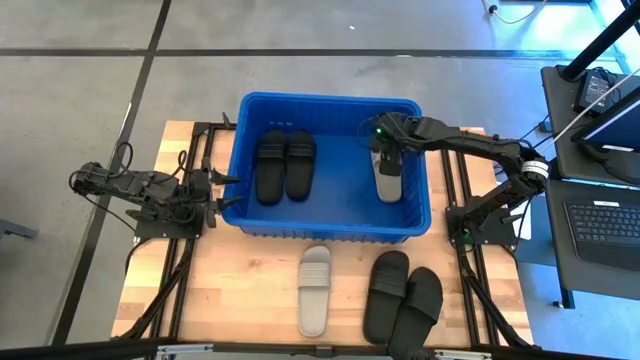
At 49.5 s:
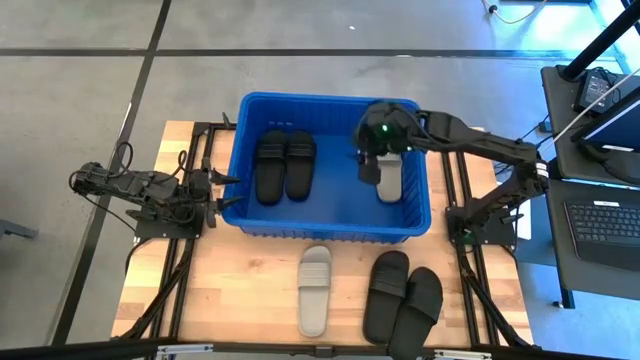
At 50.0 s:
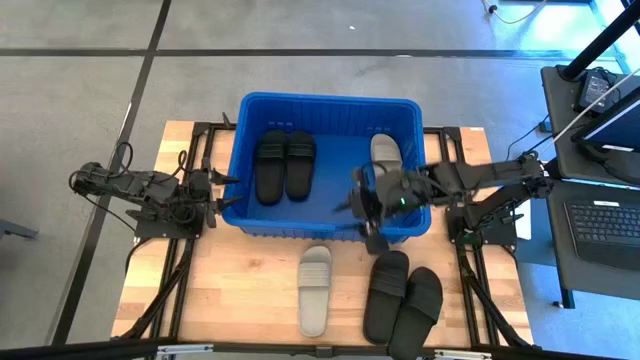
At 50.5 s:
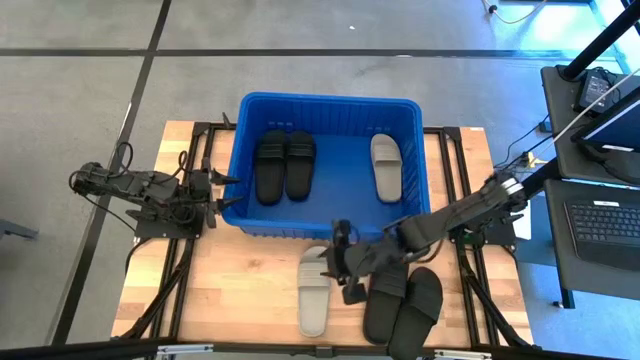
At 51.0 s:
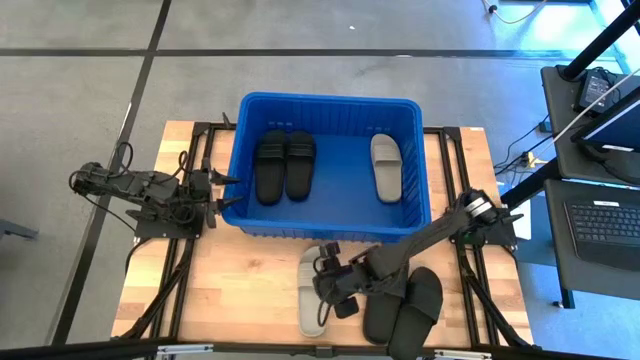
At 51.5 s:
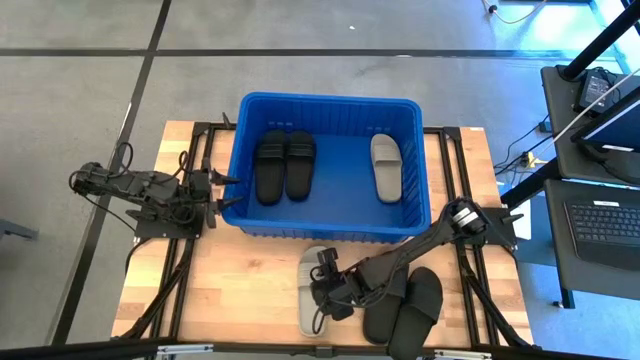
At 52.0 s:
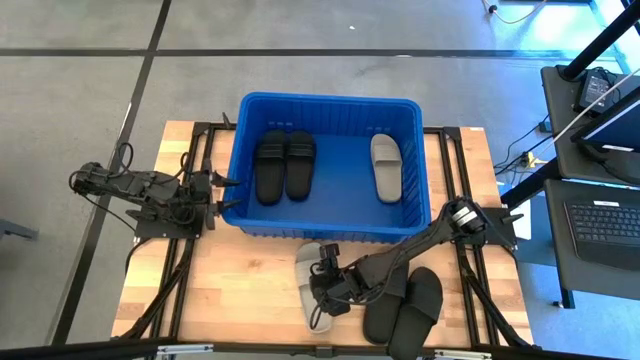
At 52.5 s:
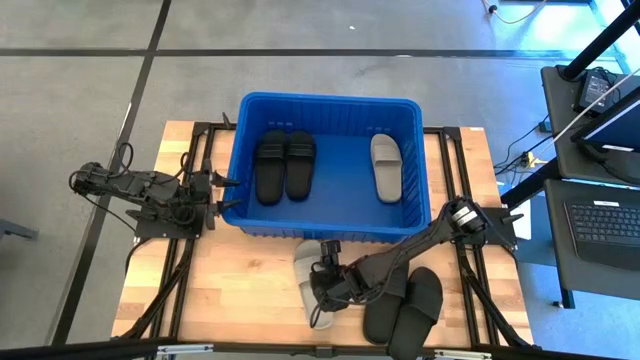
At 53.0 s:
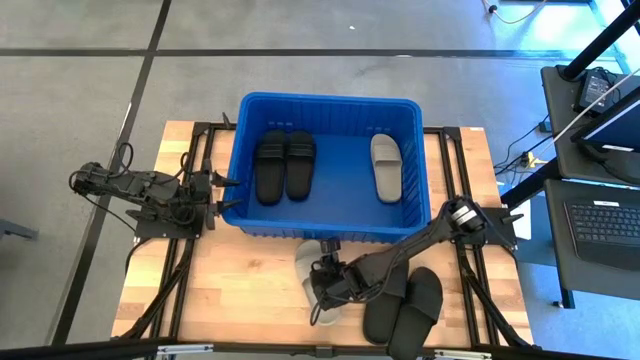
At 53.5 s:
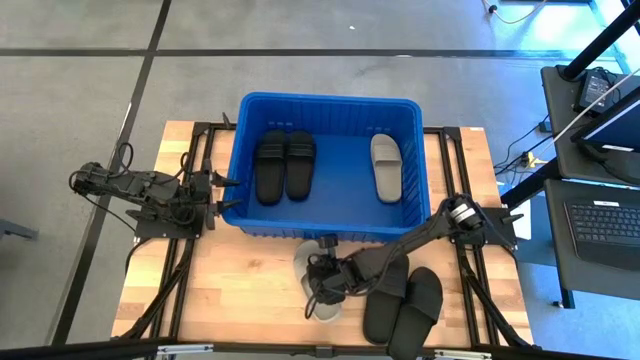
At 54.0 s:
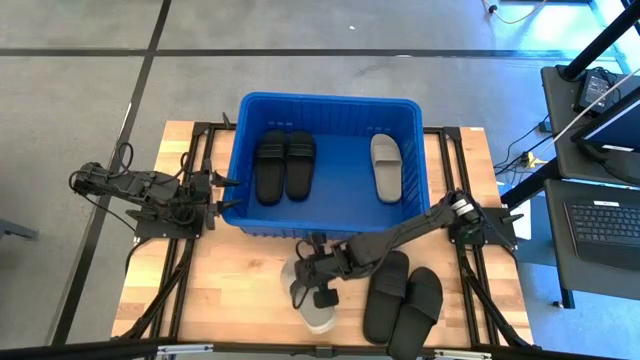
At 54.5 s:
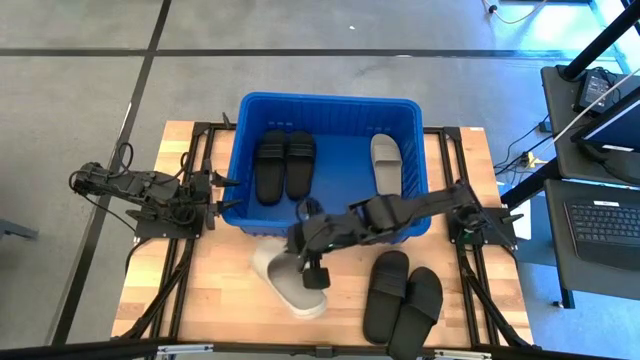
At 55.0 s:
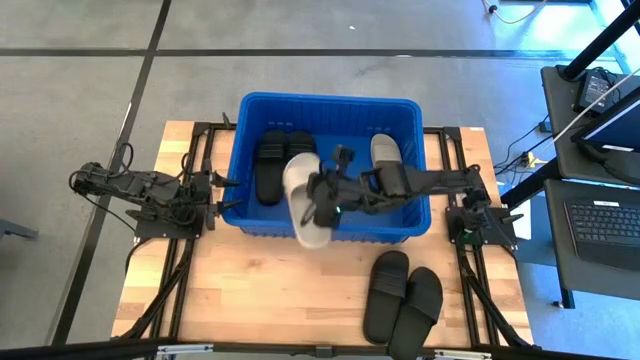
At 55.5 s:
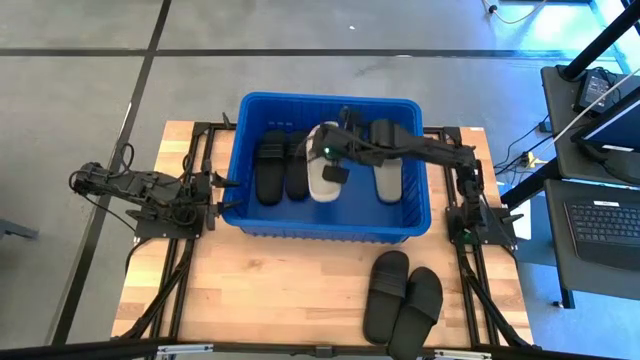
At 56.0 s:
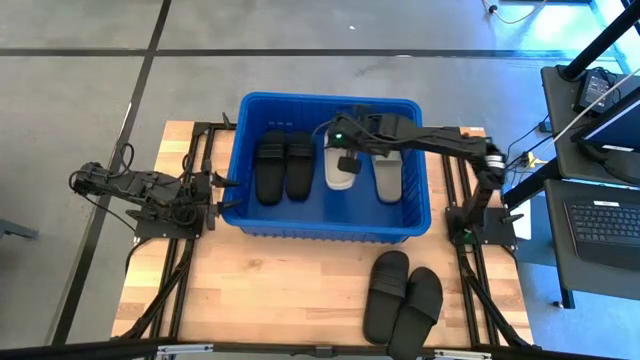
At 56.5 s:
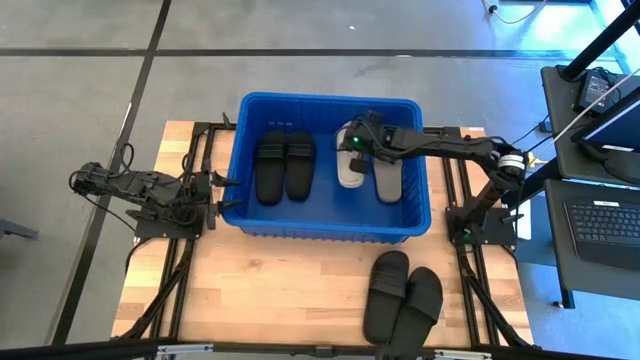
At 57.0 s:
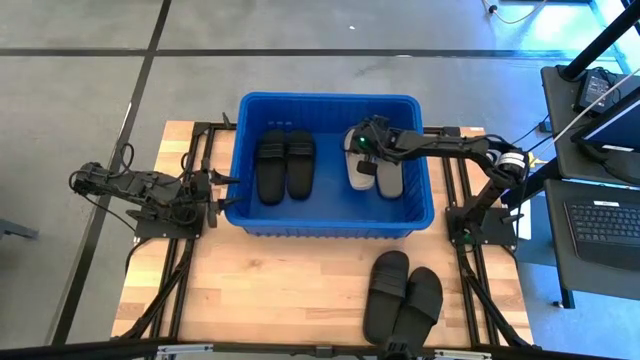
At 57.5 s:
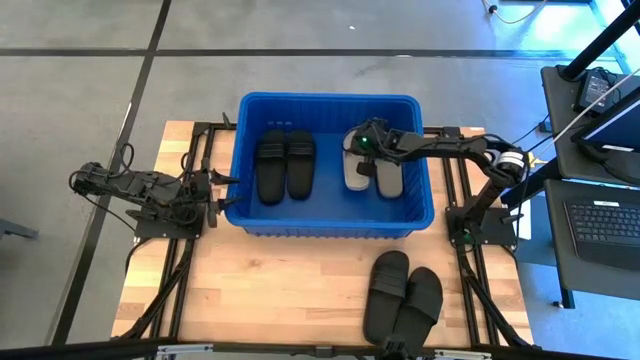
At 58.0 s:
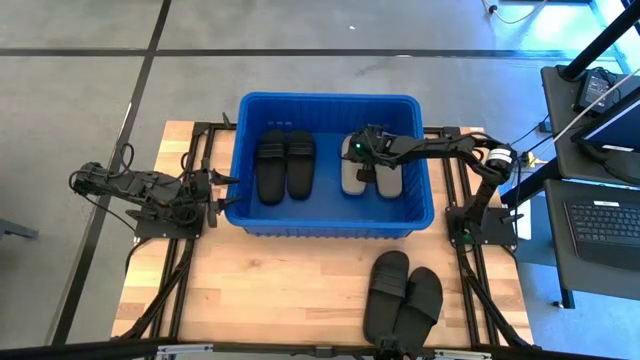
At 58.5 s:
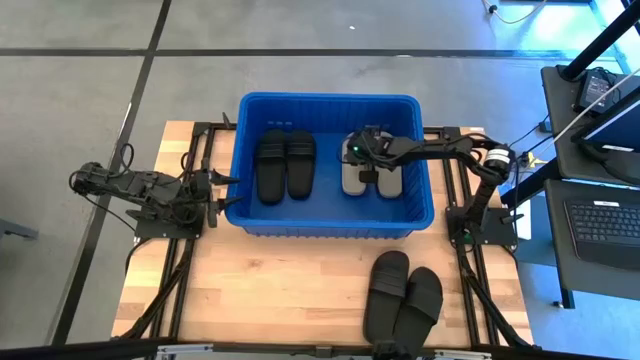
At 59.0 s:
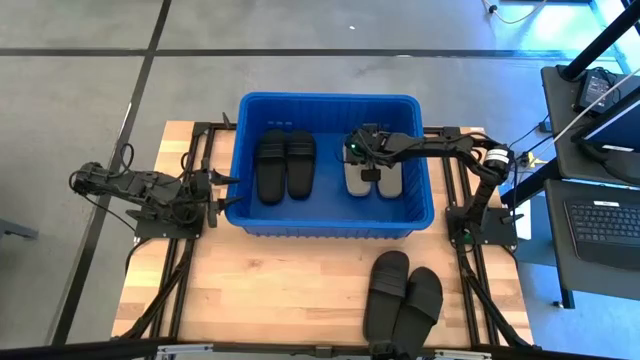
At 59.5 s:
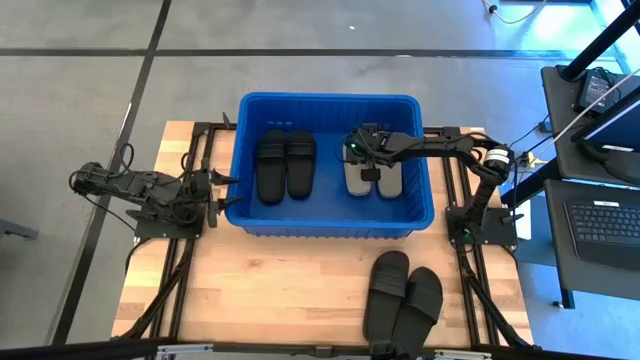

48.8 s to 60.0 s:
Task: Pick and place slides into bin
Put the gray slipper into the blue container

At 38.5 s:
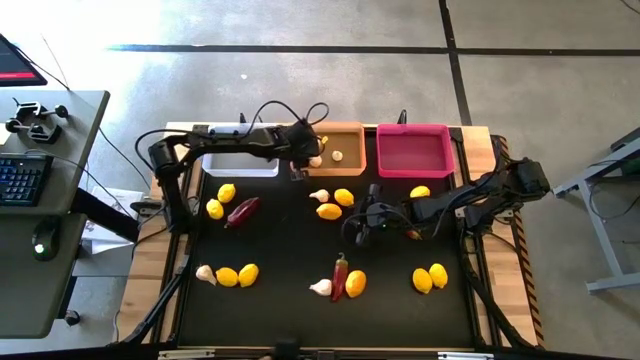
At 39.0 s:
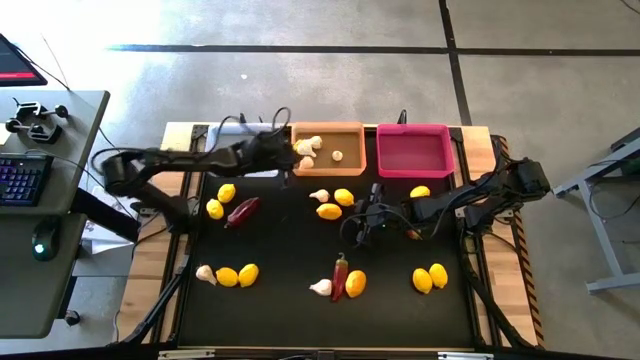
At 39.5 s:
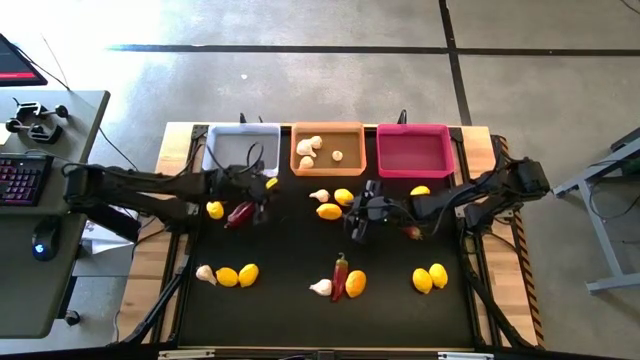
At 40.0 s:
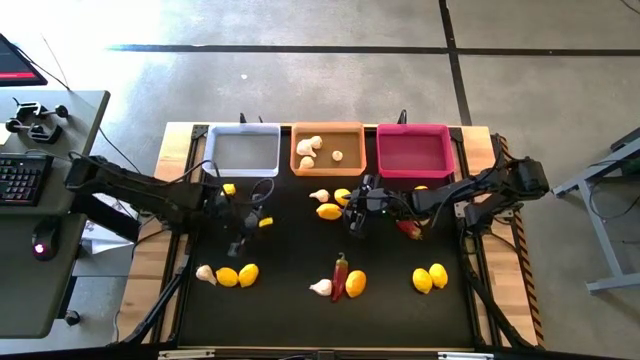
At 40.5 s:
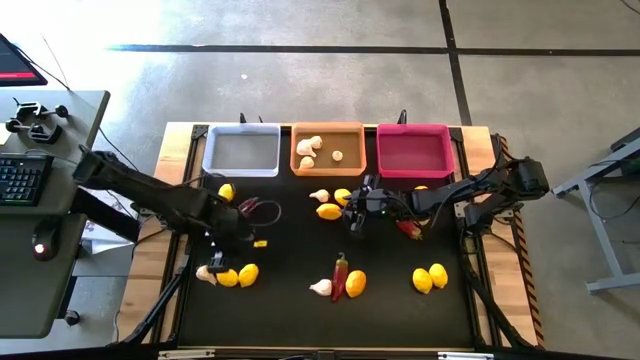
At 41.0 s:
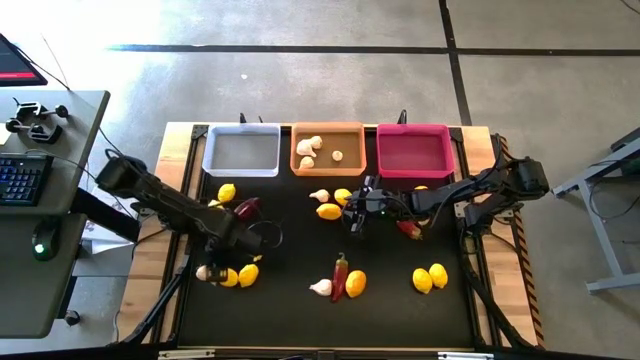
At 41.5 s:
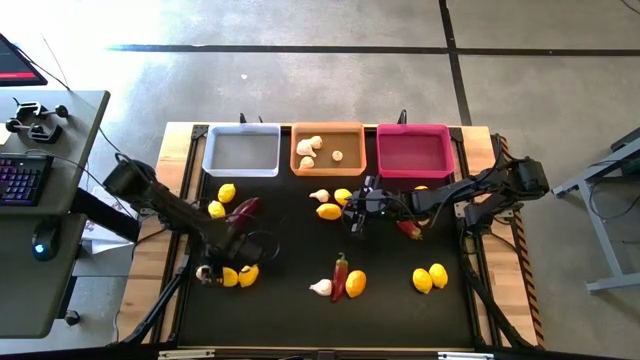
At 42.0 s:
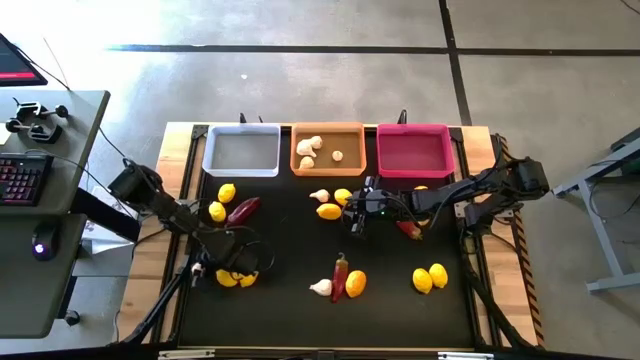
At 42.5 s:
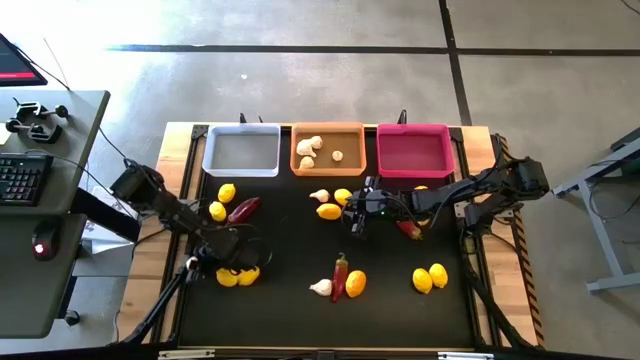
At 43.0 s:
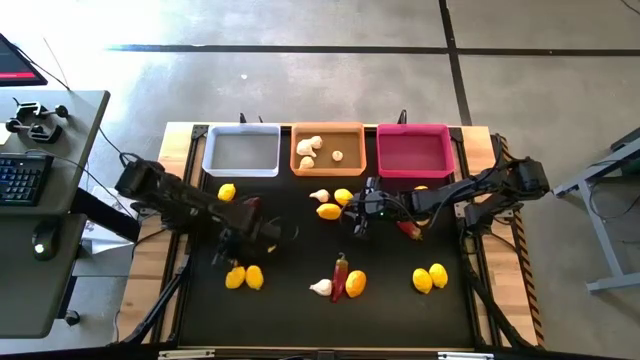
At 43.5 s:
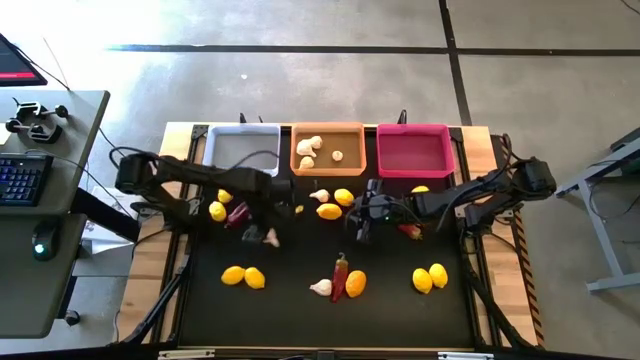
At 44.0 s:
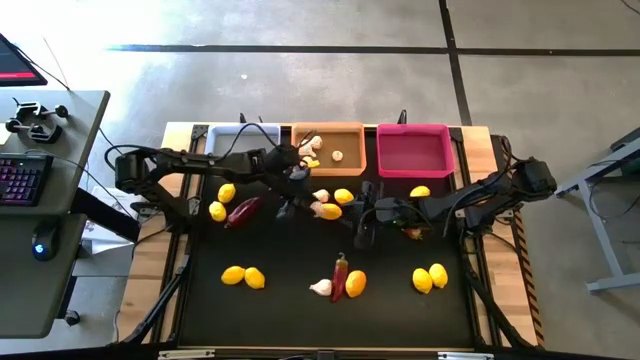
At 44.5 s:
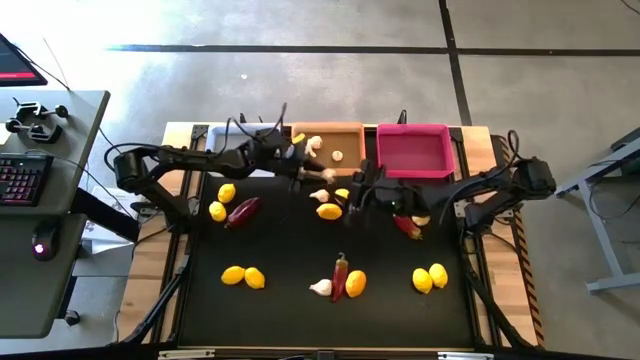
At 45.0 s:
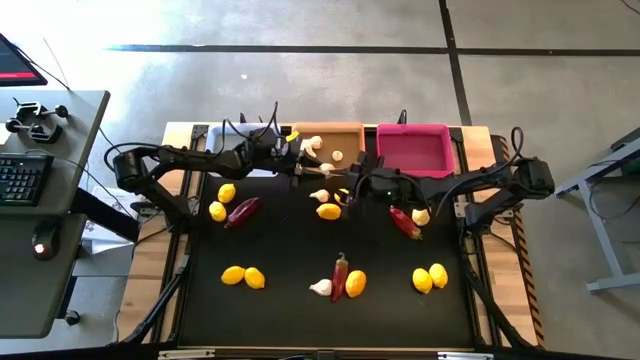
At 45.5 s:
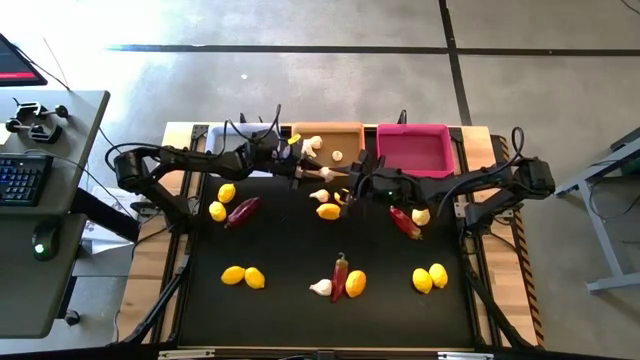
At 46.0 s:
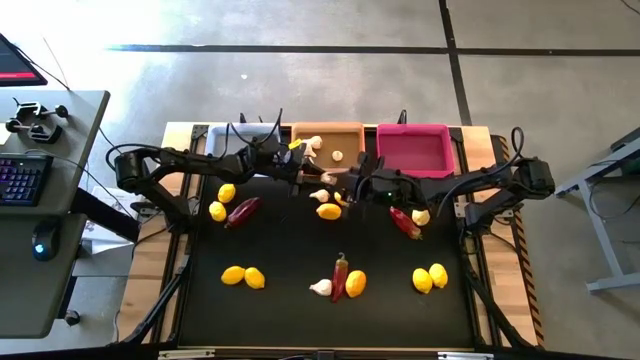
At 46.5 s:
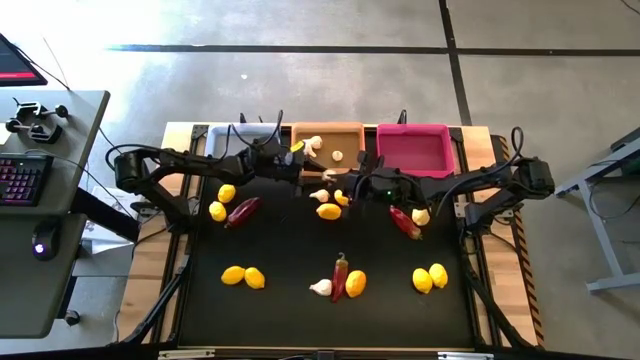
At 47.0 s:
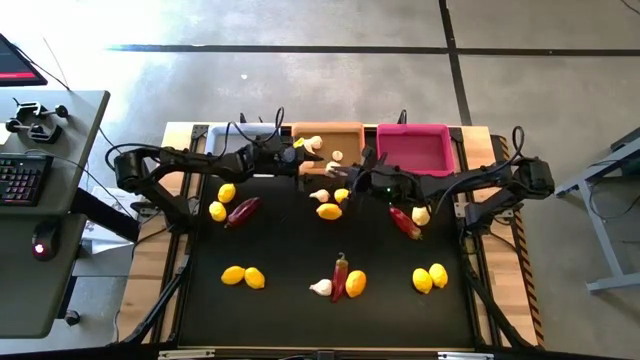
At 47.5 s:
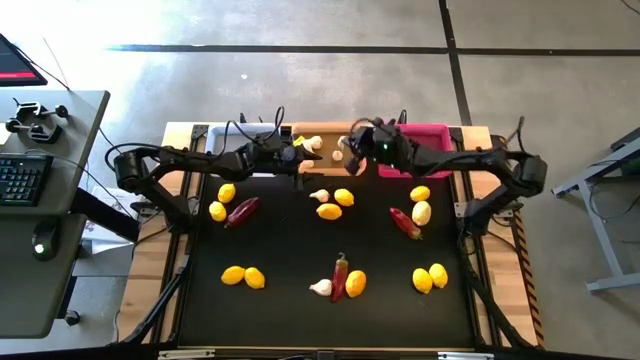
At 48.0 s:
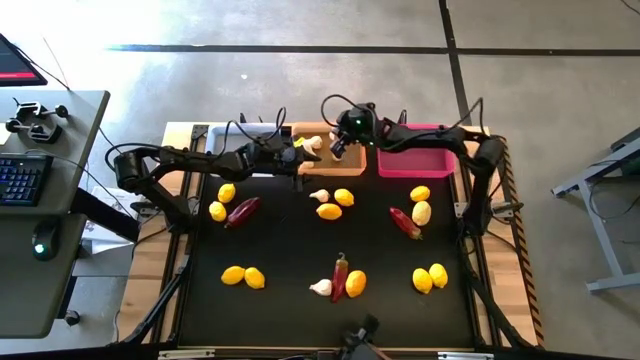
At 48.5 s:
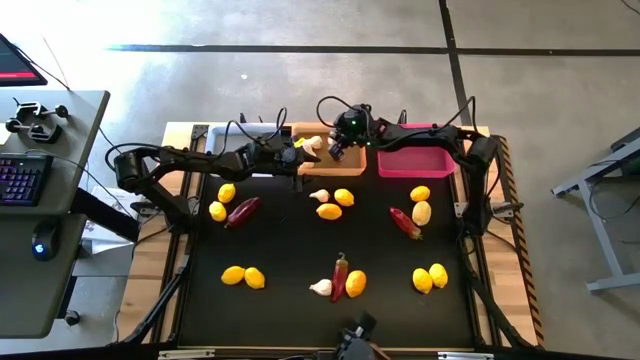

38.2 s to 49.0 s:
Task: Sort produce into baskets
Put the white garlic into the orange bin
